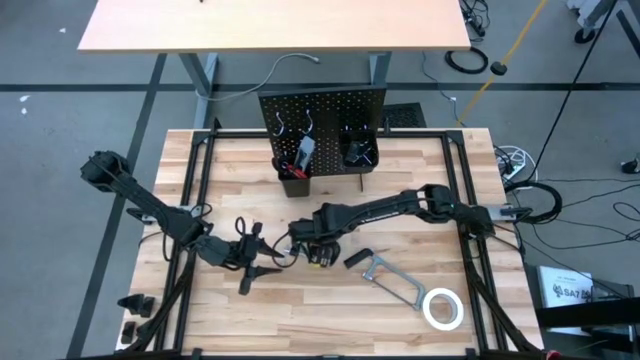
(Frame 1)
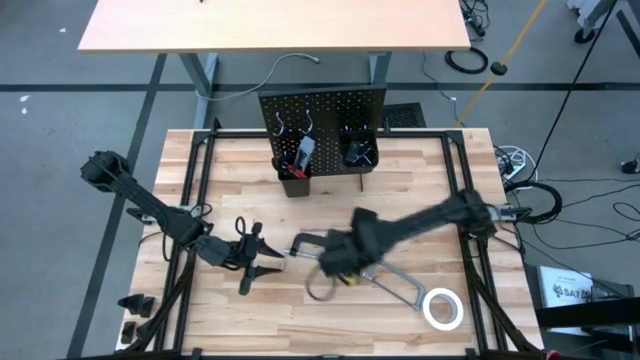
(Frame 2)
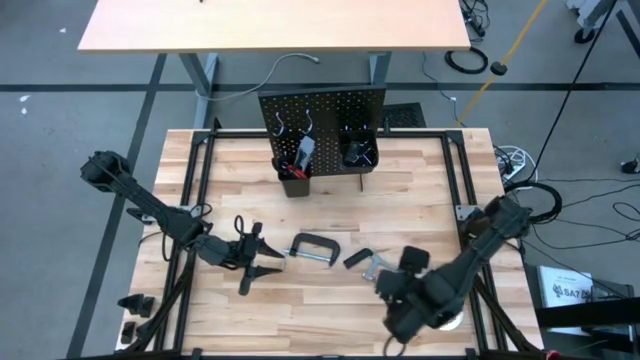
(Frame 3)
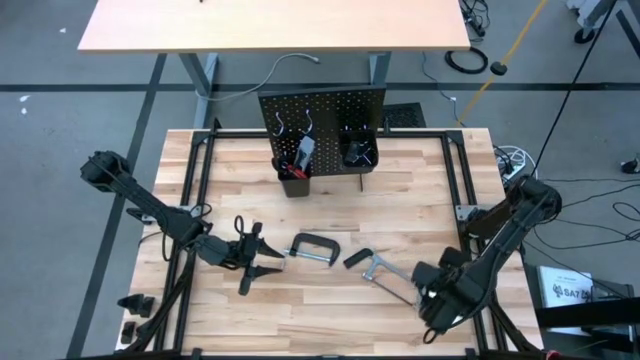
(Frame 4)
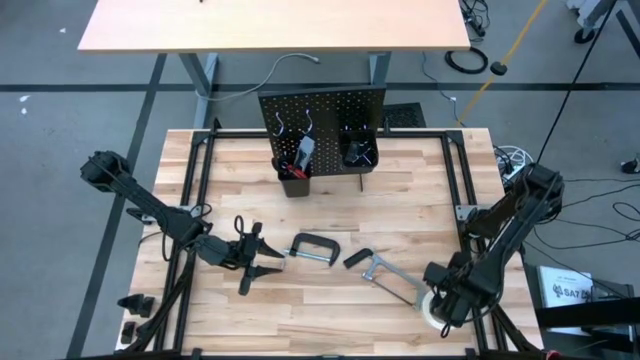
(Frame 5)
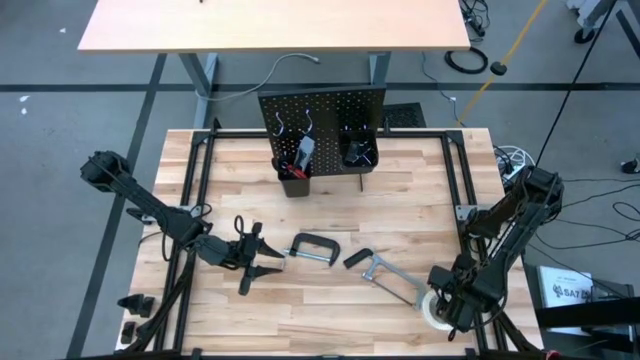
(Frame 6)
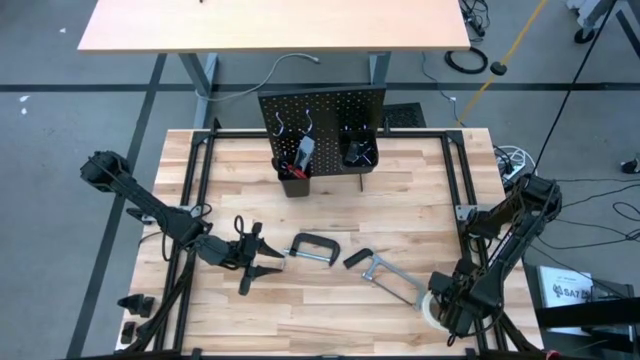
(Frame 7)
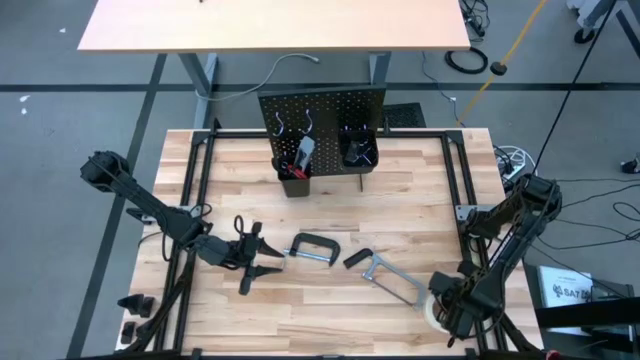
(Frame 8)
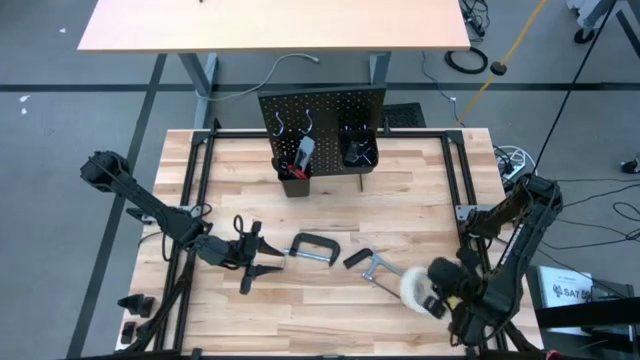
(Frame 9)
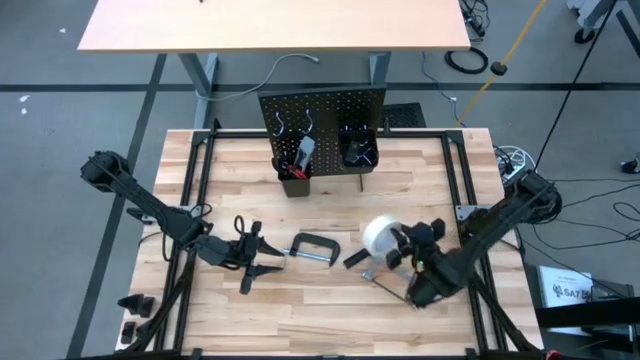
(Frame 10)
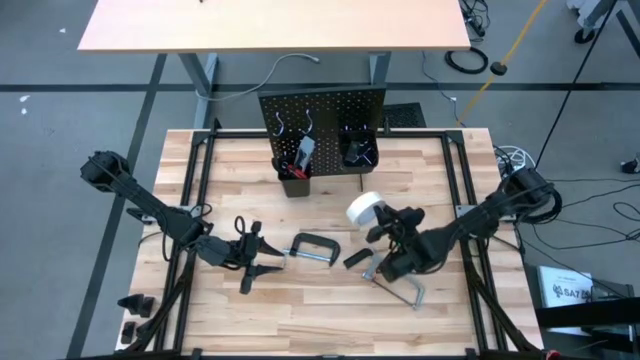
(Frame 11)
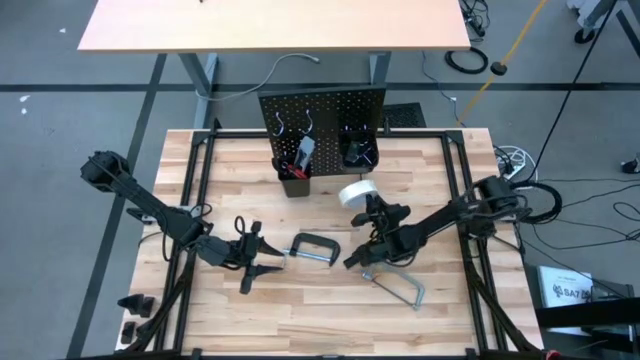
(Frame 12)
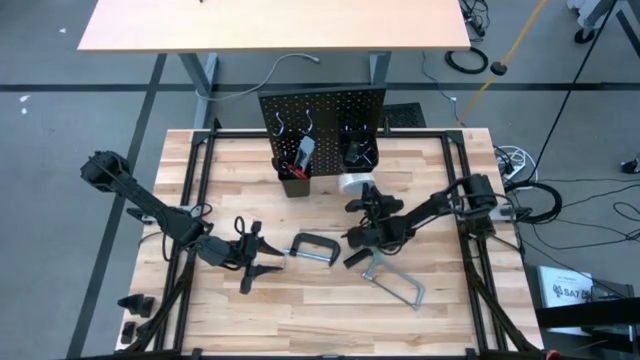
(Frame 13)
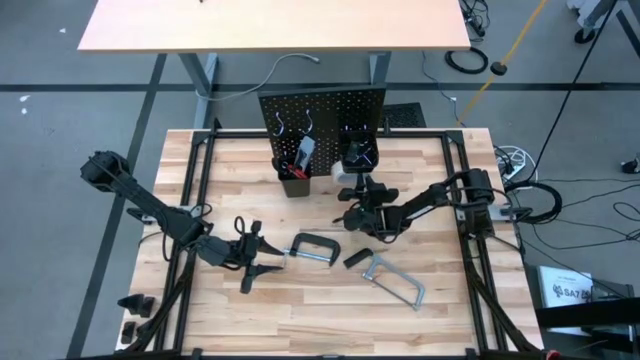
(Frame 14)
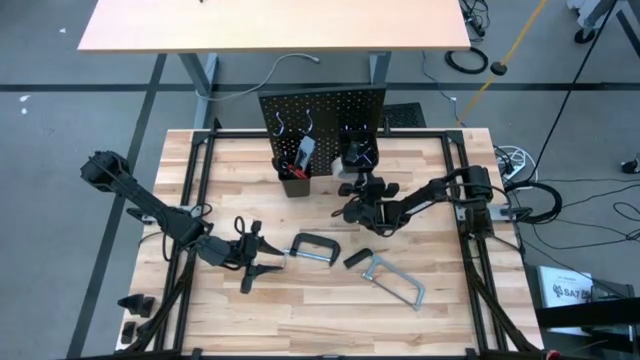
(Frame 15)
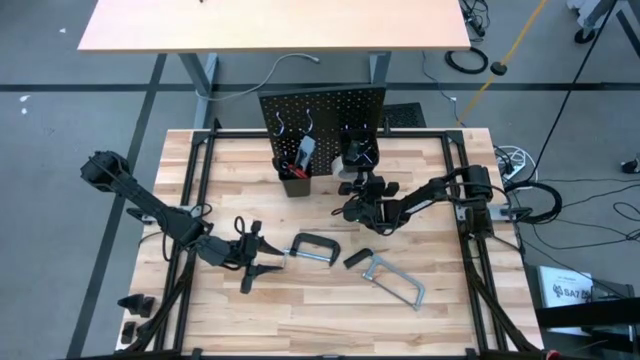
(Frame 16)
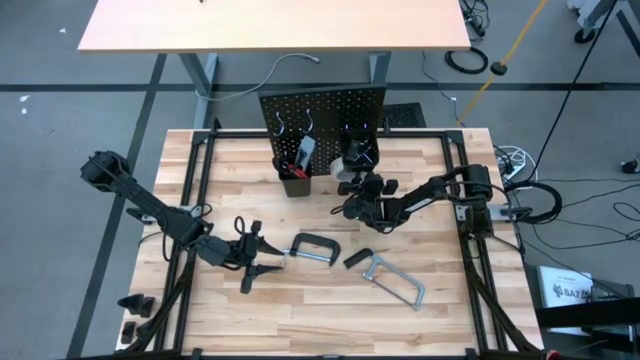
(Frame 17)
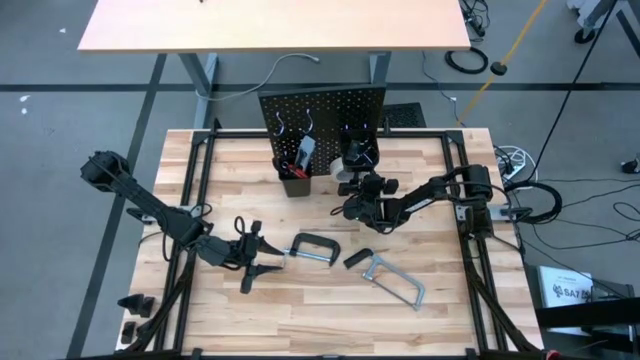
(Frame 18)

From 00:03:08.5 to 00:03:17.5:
Task: Hang tools onto peg board
Hang the white tape on the pegboard

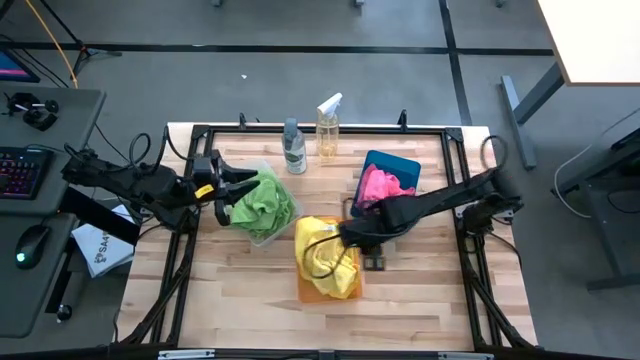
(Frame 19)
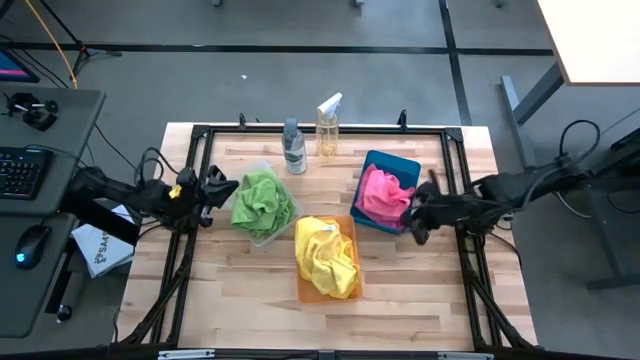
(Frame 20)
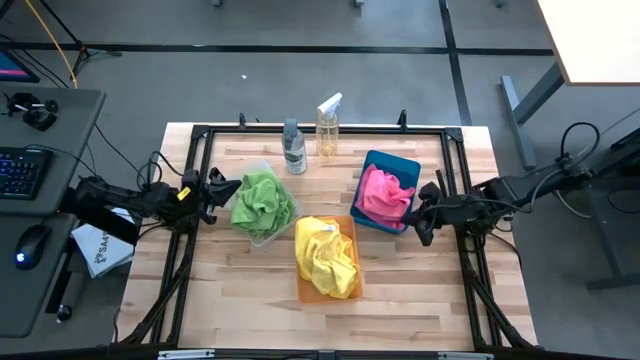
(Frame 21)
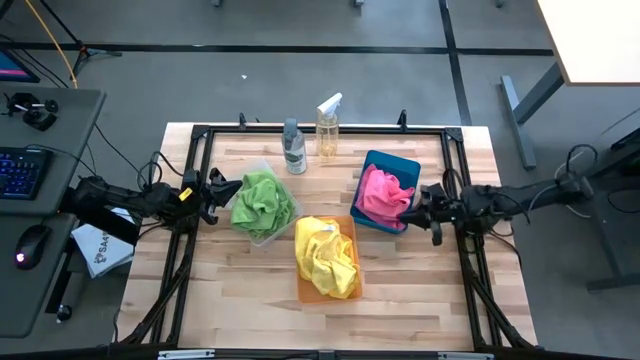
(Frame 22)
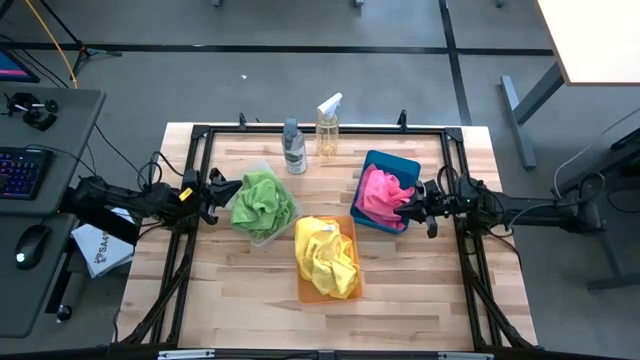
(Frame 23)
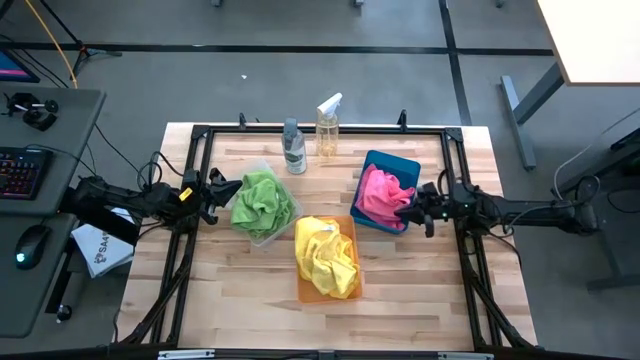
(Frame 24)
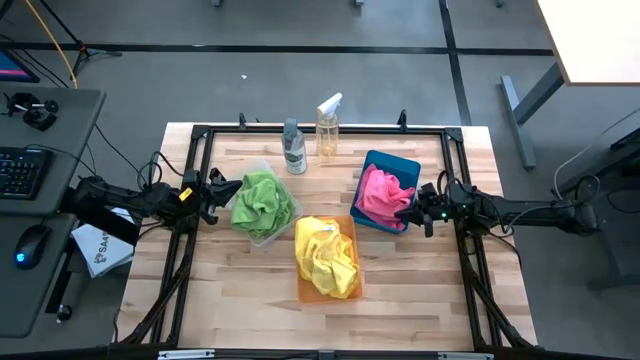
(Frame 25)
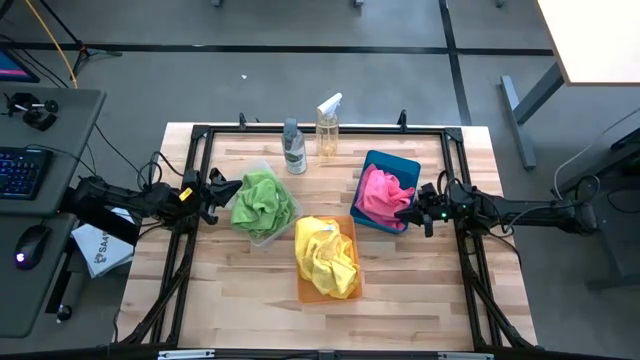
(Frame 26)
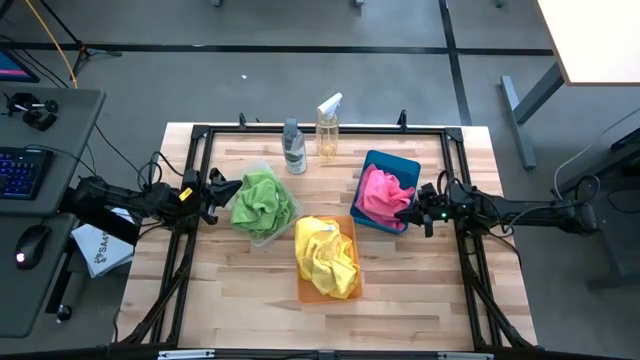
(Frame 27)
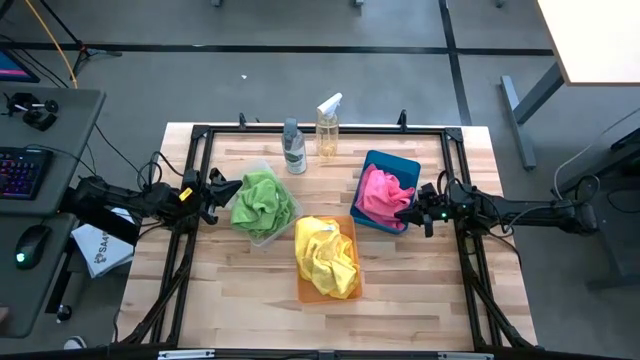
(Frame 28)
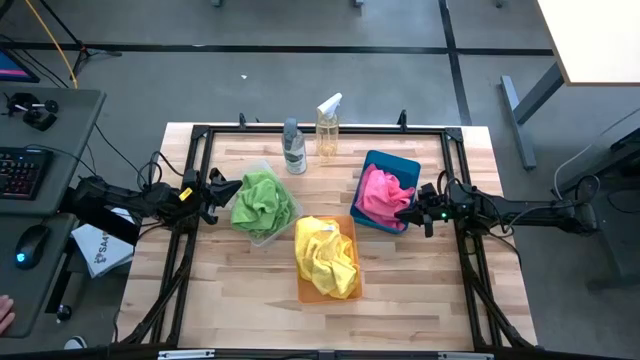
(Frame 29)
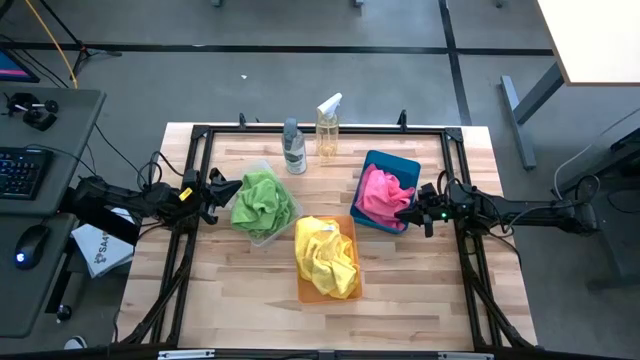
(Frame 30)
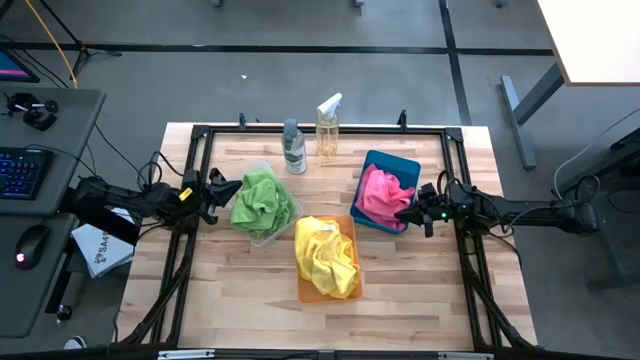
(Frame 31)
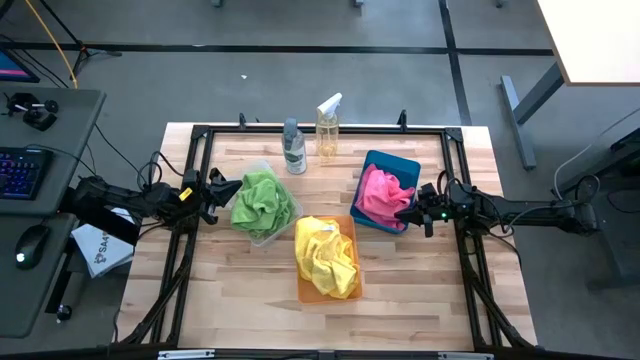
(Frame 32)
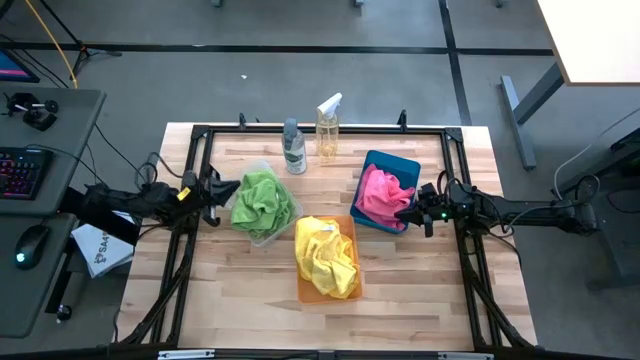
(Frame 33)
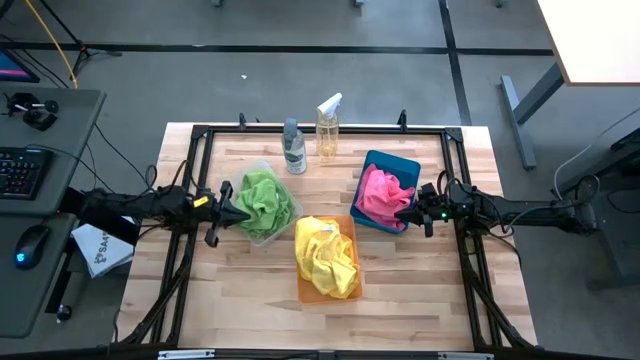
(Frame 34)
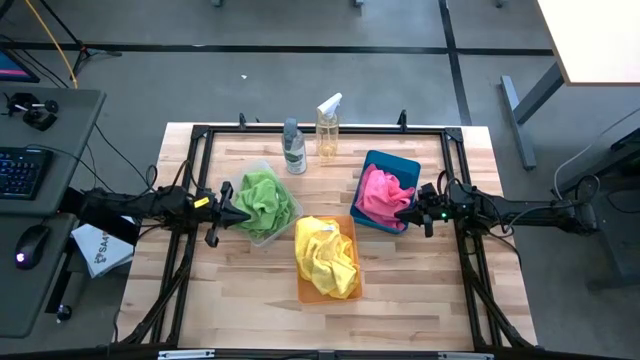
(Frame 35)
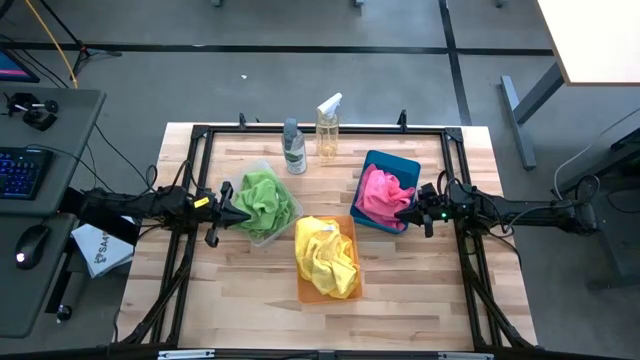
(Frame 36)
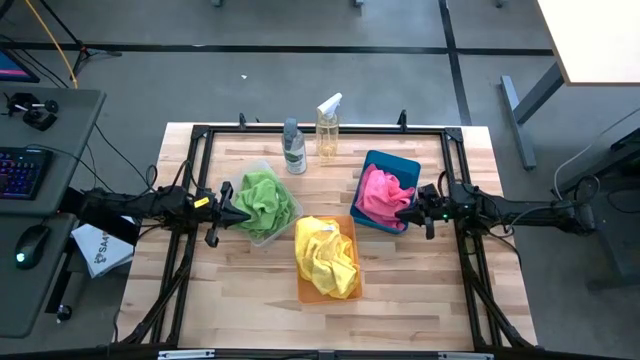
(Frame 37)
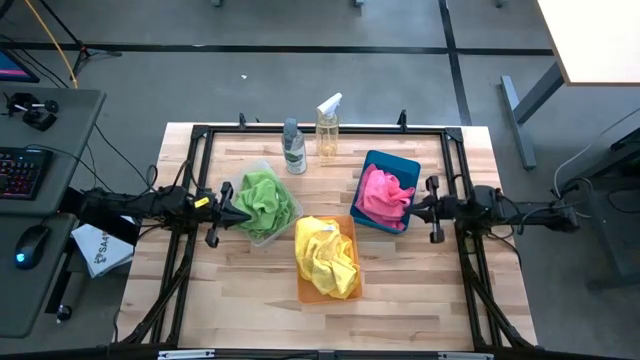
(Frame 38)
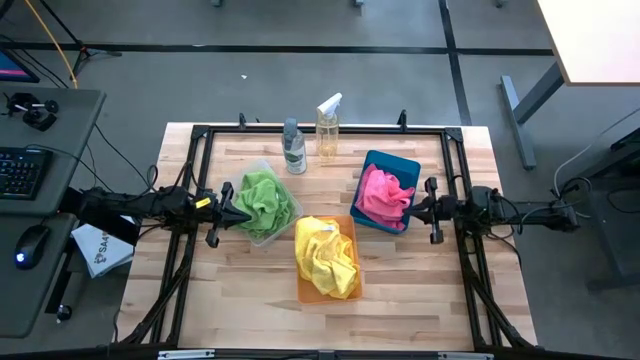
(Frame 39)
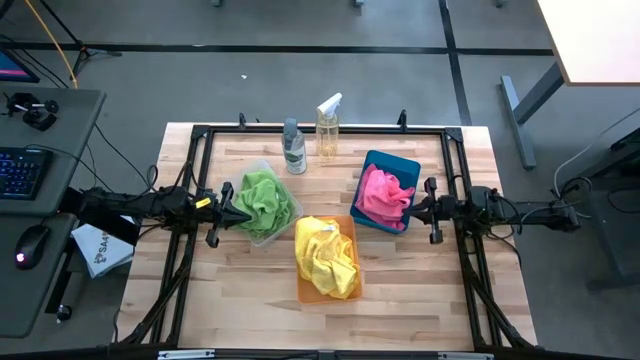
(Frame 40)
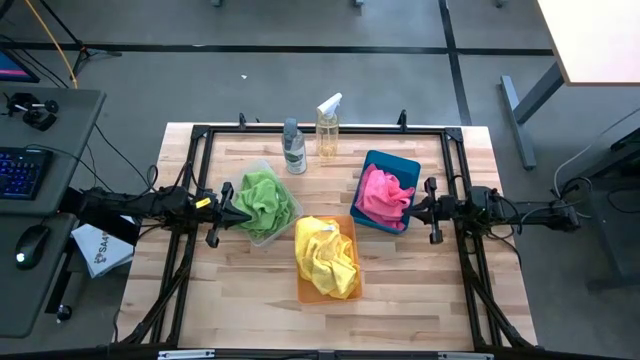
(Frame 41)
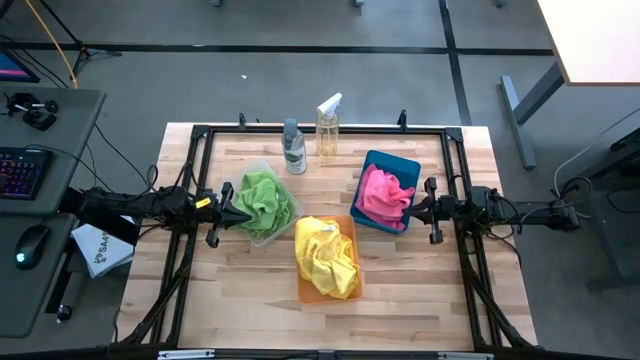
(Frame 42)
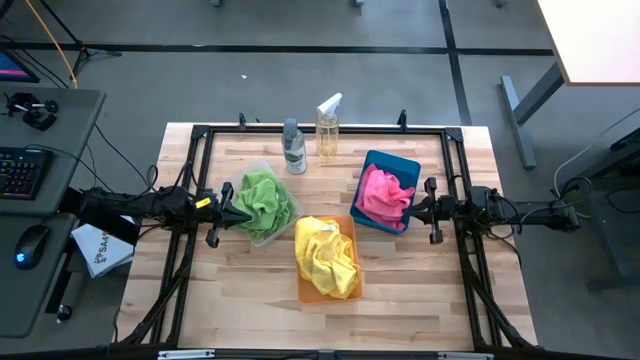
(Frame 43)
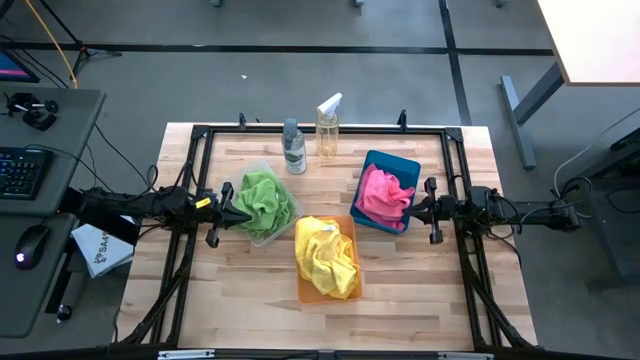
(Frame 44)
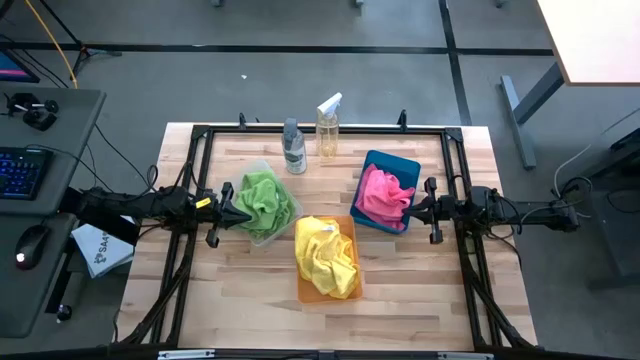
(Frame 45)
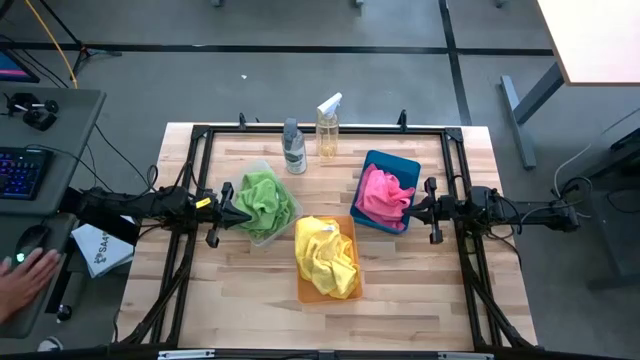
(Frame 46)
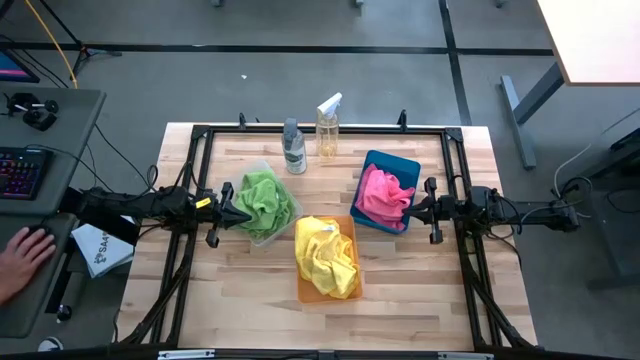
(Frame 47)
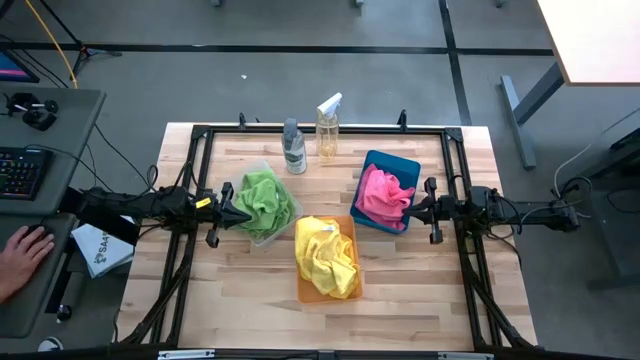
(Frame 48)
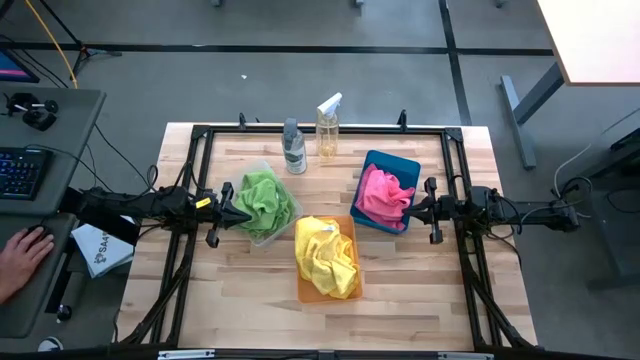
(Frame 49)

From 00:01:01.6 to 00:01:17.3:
Task: Sort microfiber towel by color & place in baskets
Return to Home Position
